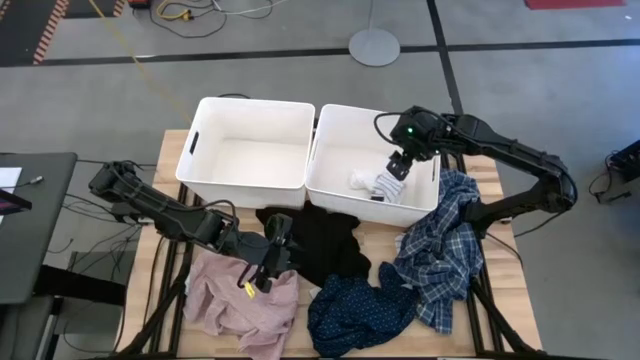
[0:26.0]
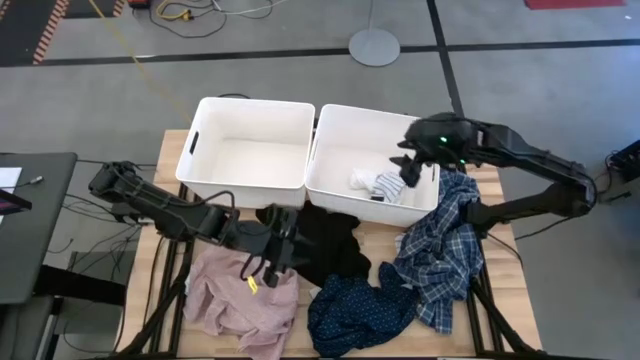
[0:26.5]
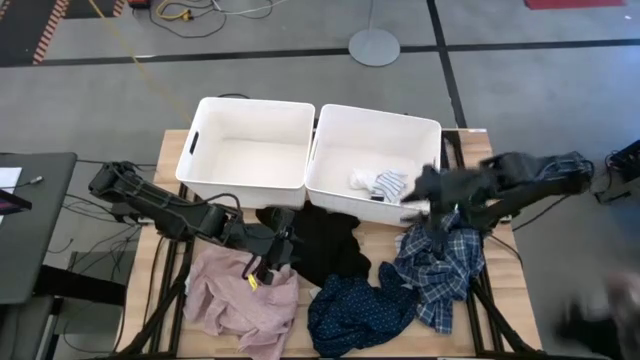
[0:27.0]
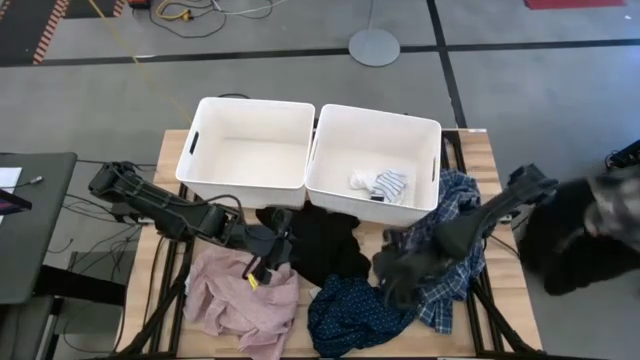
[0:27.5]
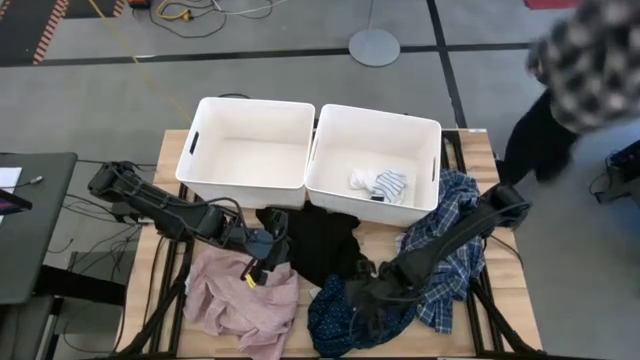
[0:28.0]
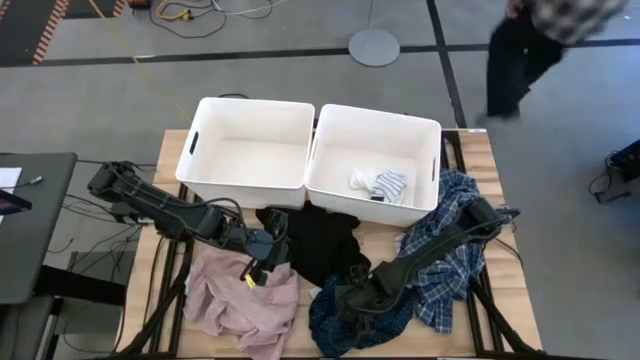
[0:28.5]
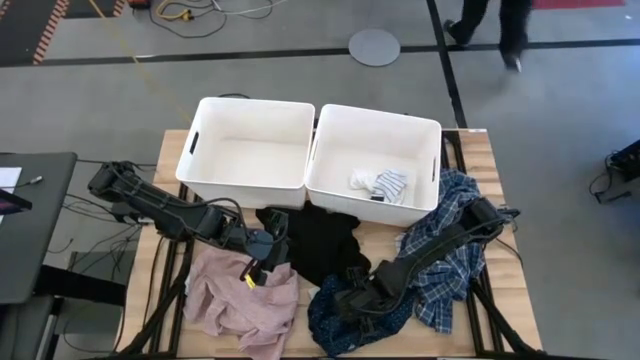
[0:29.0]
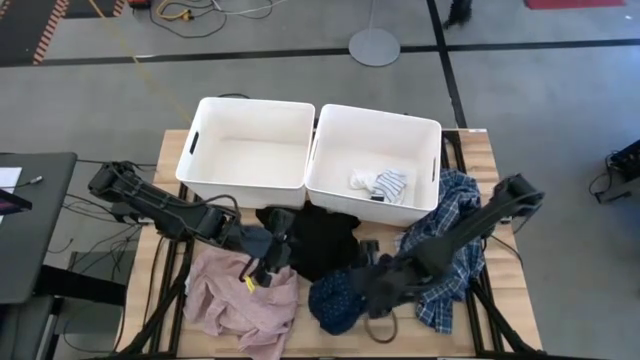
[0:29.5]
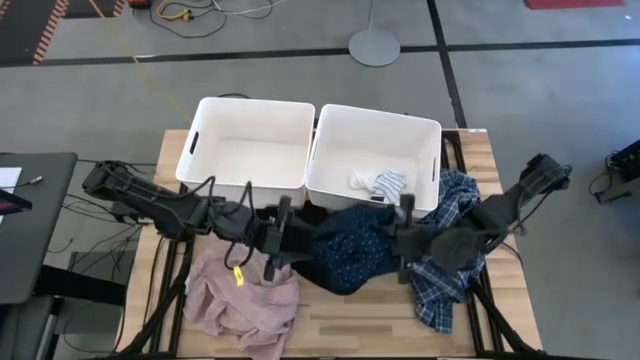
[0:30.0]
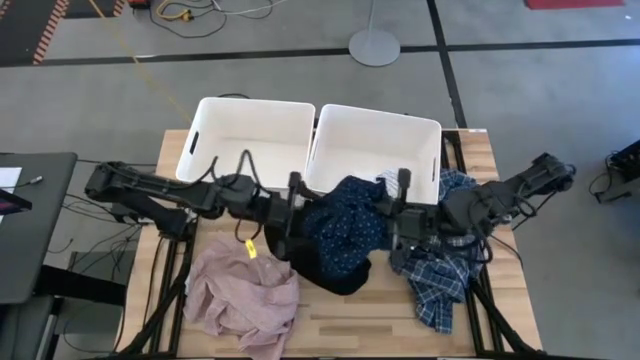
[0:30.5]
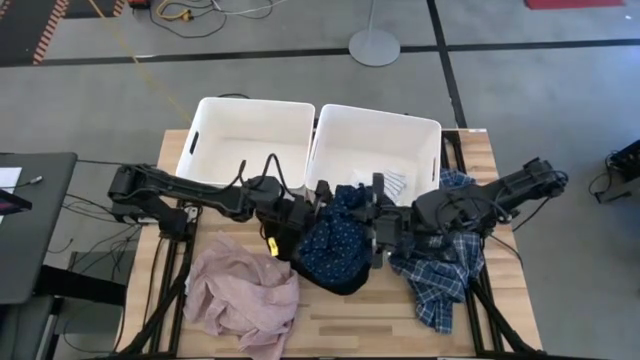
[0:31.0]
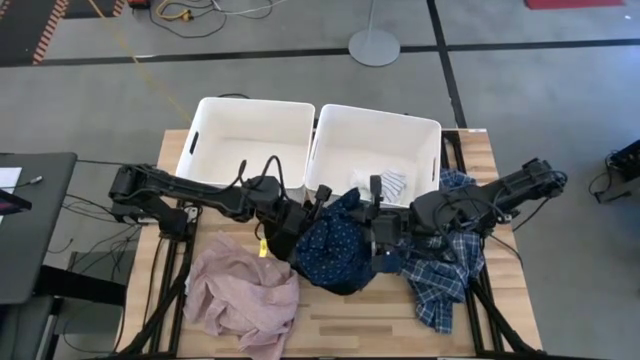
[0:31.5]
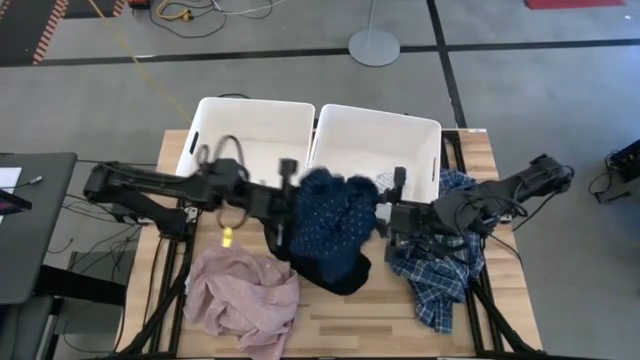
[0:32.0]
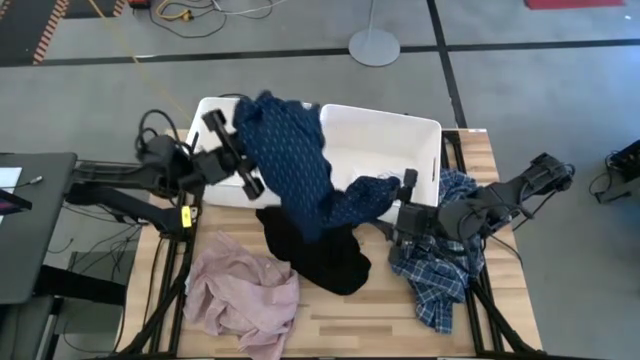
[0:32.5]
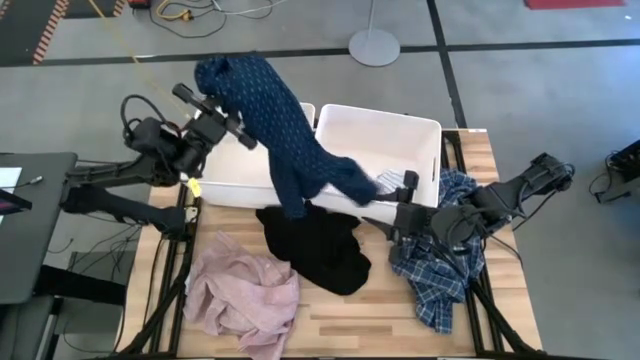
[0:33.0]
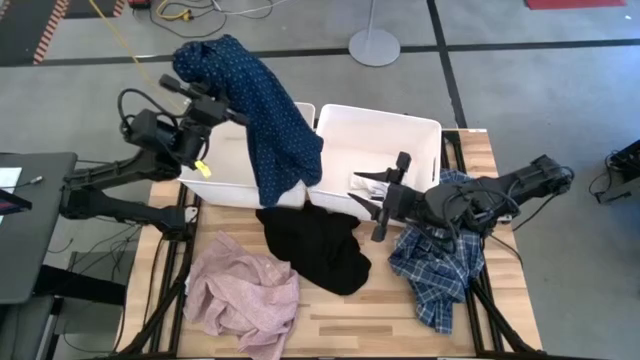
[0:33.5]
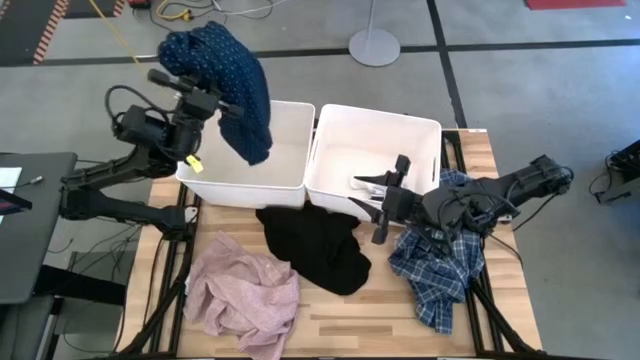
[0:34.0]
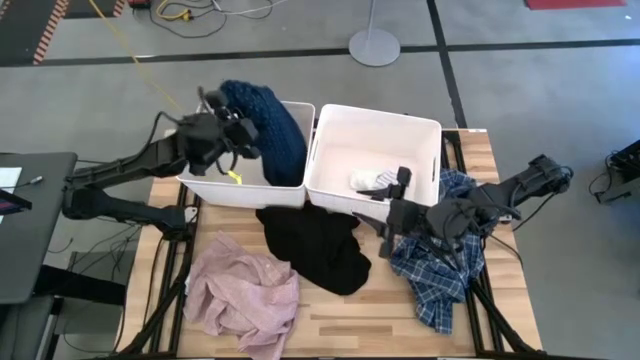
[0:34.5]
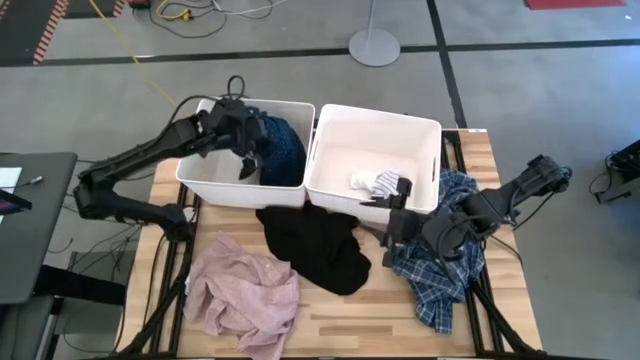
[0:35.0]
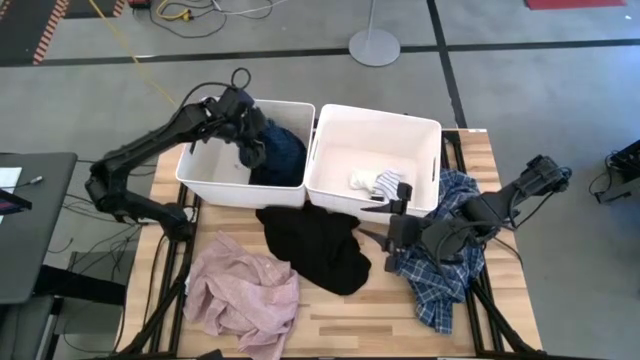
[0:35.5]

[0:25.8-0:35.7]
Task: Sort clothes
Put the blue long sleeve into the left white laundry bin

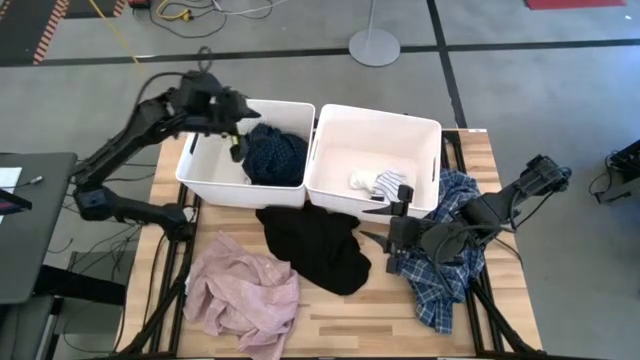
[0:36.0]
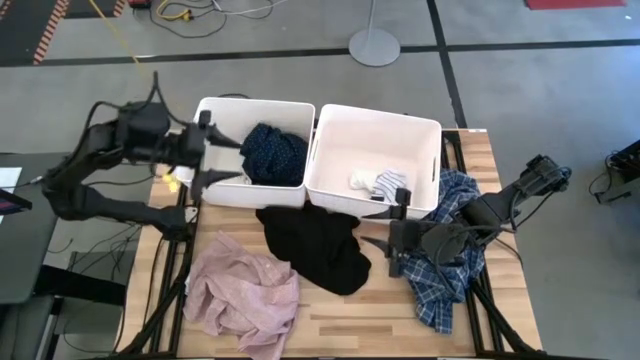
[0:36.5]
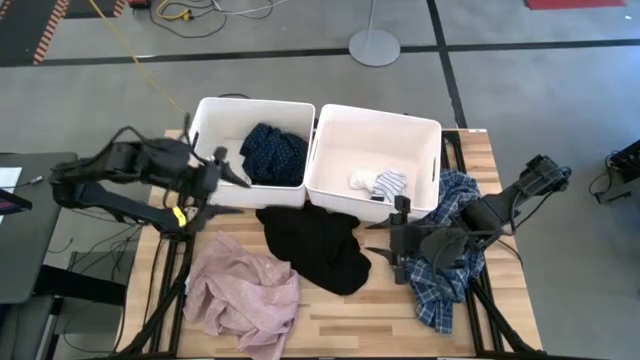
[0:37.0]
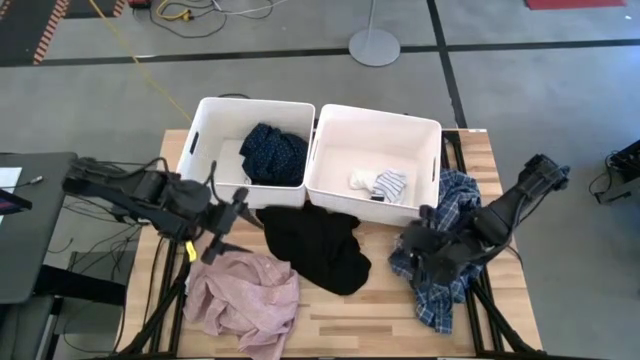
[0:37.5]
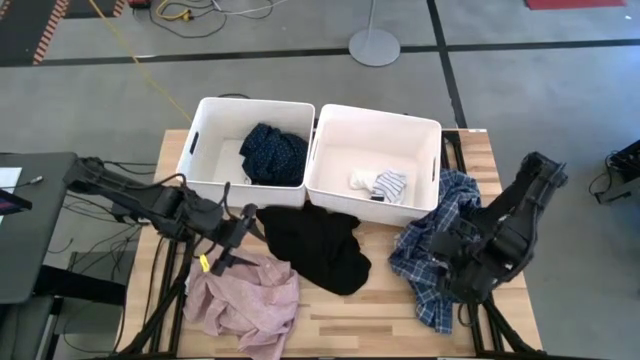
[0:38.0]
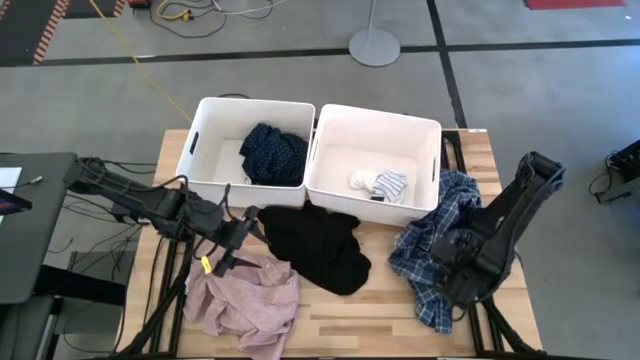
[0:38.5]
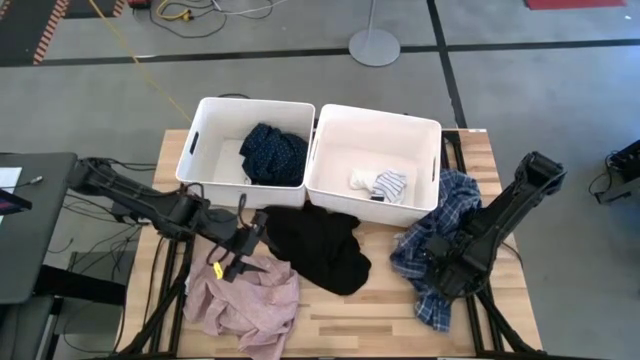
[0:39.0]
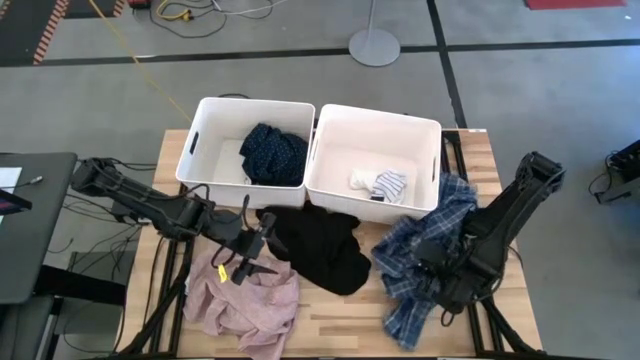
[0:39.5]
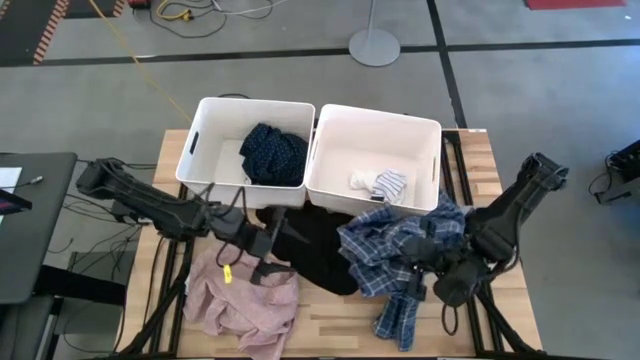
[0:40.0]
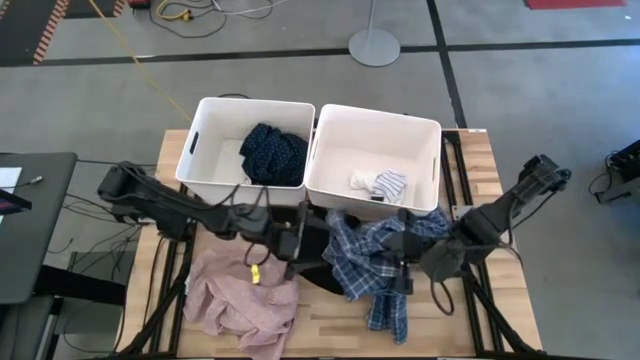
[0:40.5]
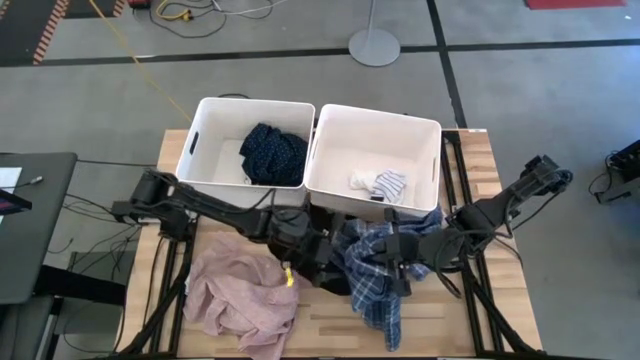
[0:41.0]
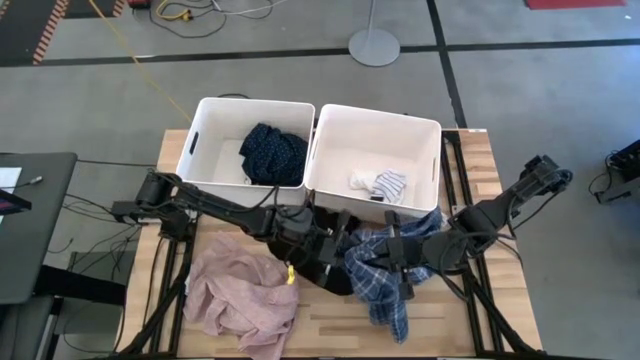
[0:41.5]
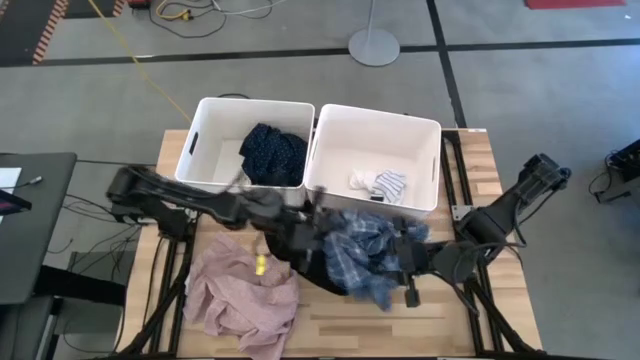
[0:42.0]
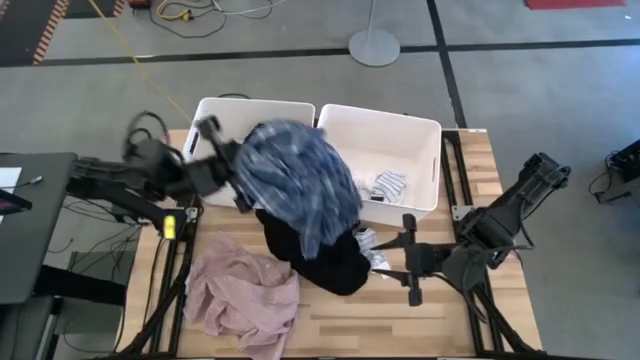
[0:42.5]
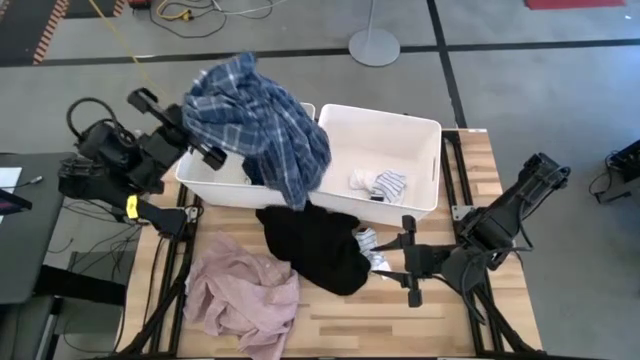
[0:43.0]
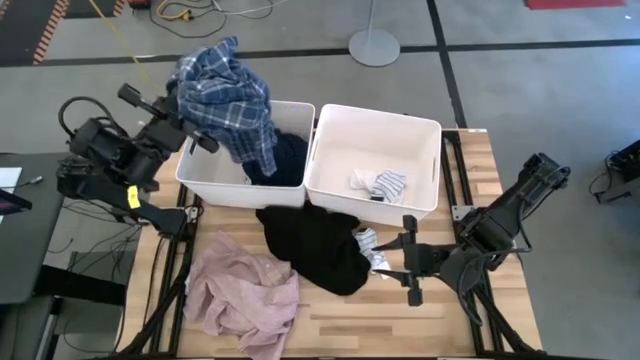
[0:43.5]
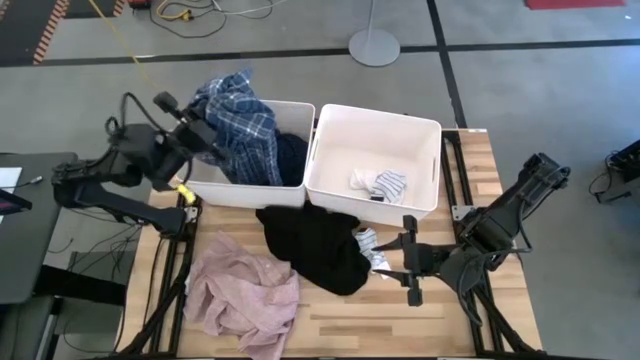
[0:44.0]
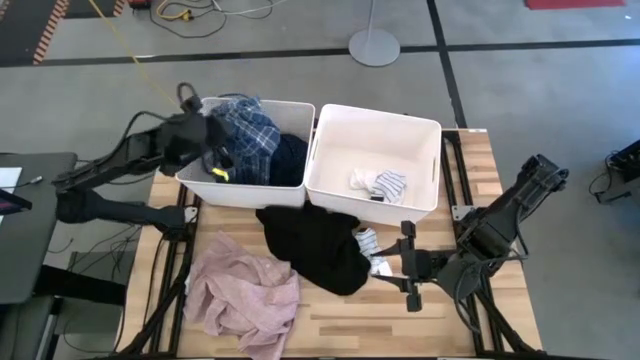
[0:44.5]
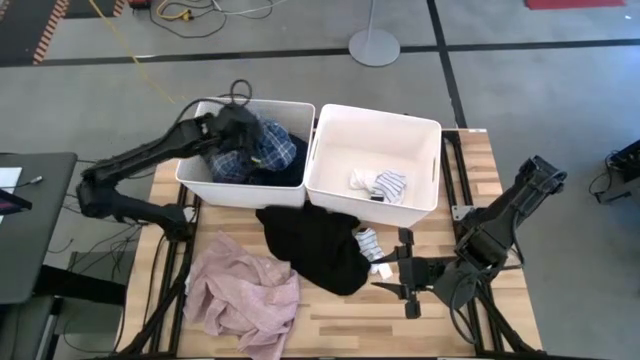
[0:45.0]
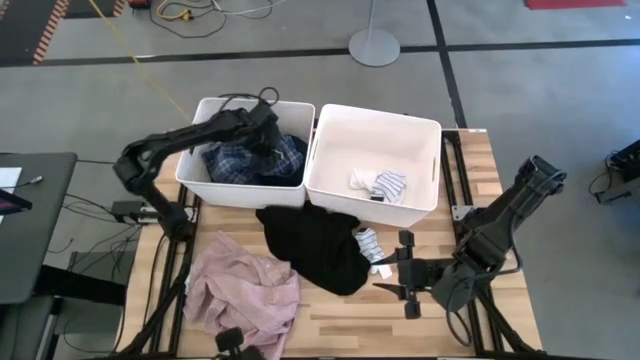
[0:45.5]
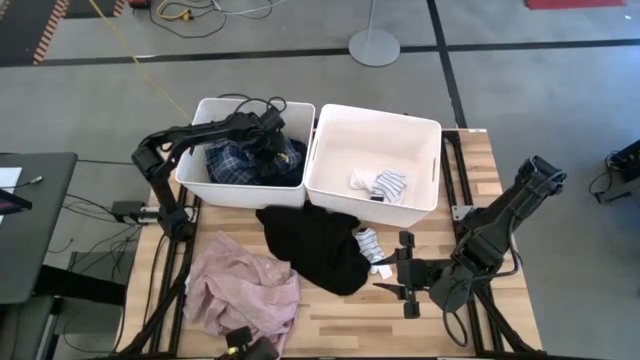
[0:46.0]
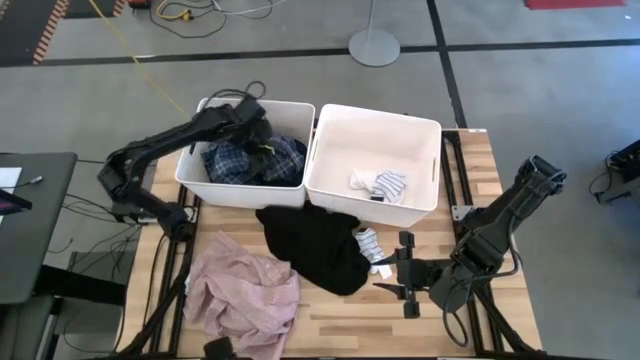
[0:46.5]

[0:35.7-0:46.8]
Put the blue checkered long sleeve into the left white laundry bin
